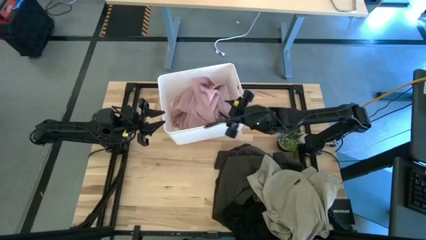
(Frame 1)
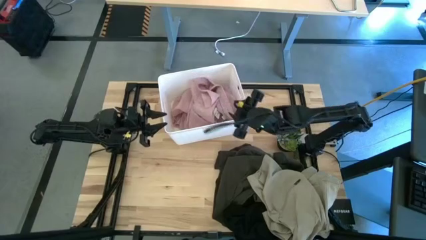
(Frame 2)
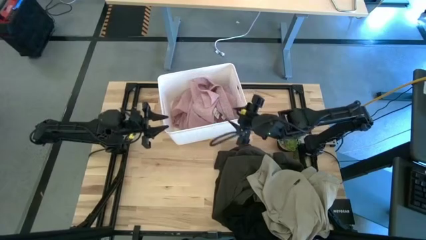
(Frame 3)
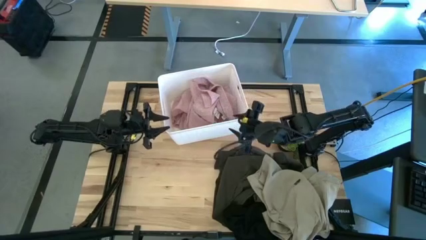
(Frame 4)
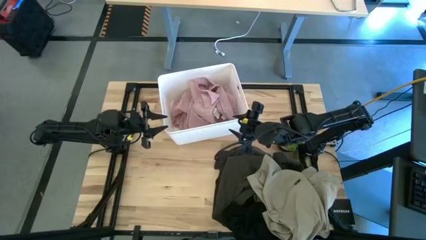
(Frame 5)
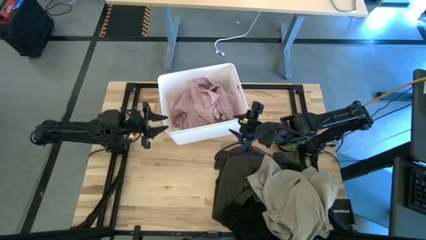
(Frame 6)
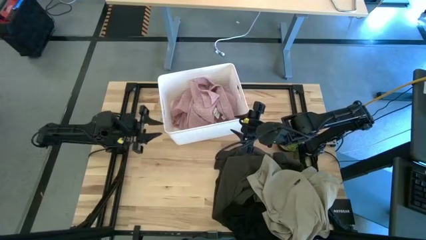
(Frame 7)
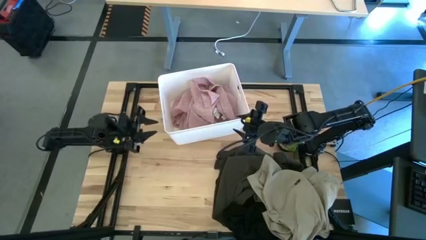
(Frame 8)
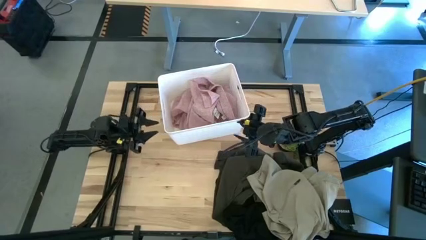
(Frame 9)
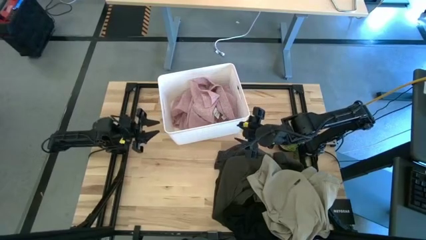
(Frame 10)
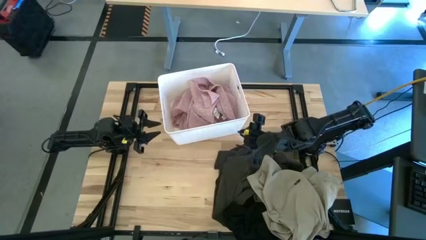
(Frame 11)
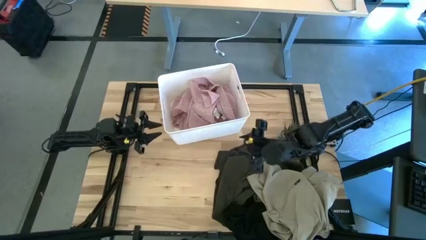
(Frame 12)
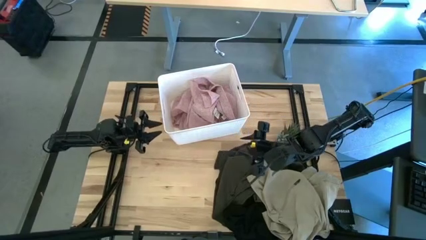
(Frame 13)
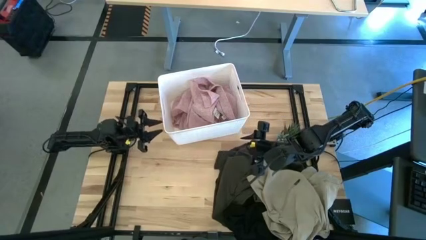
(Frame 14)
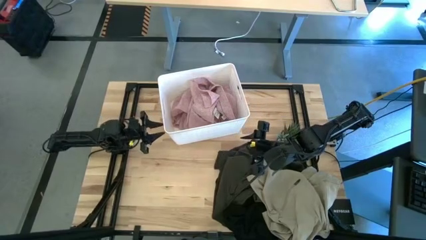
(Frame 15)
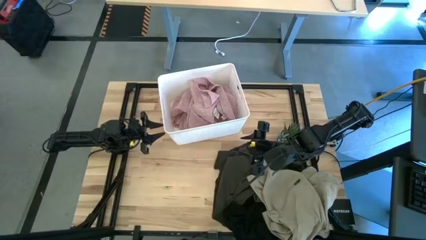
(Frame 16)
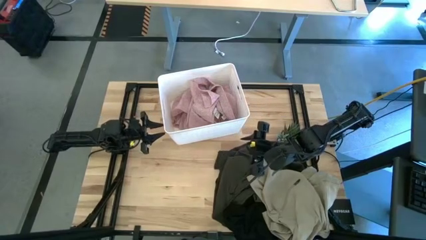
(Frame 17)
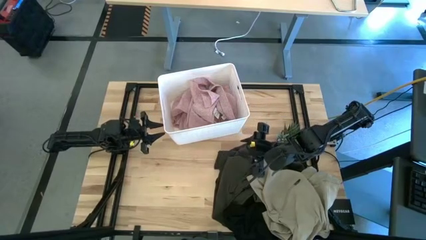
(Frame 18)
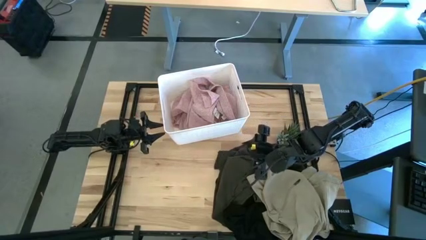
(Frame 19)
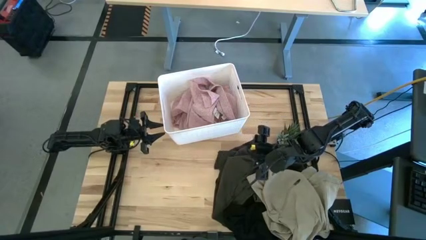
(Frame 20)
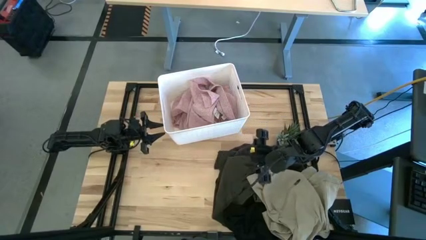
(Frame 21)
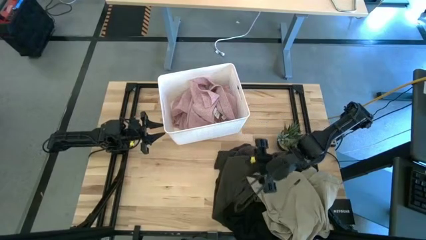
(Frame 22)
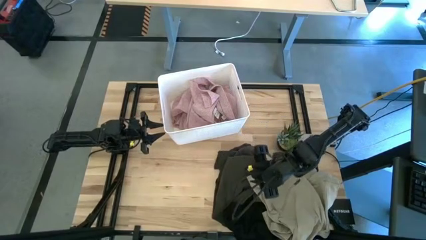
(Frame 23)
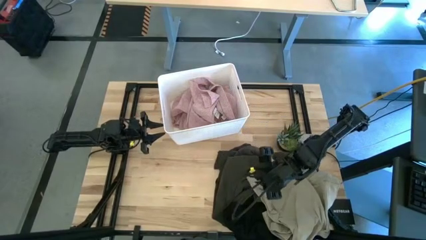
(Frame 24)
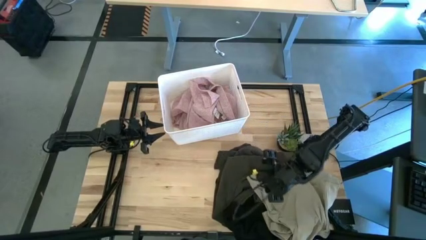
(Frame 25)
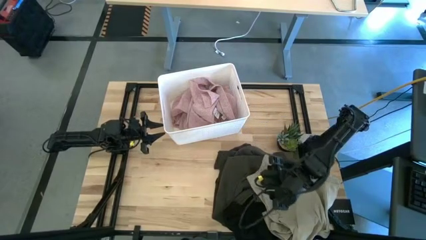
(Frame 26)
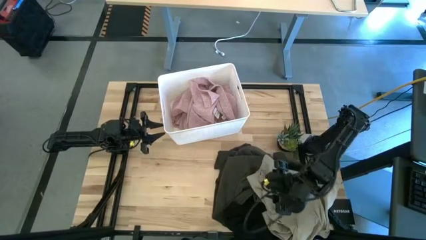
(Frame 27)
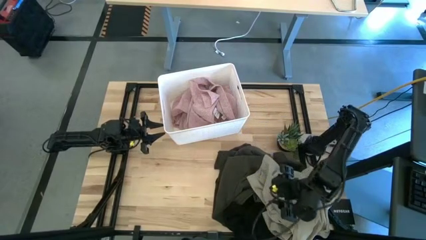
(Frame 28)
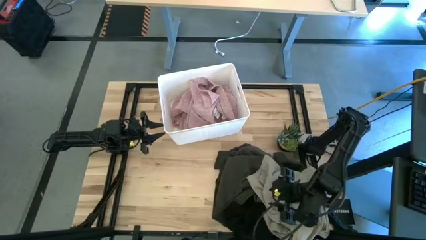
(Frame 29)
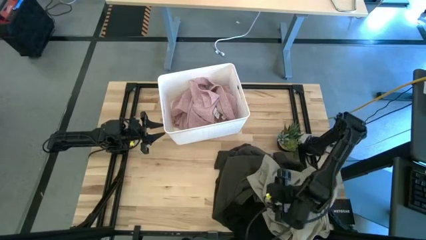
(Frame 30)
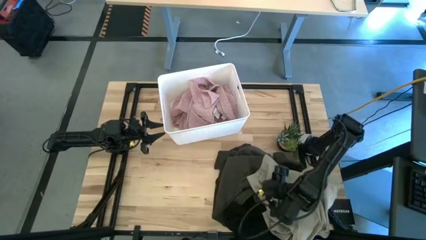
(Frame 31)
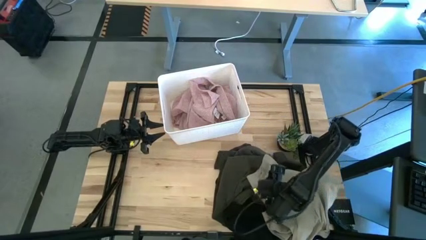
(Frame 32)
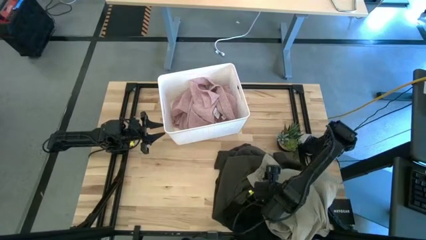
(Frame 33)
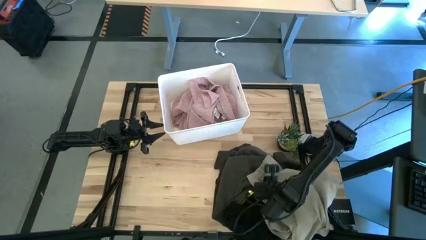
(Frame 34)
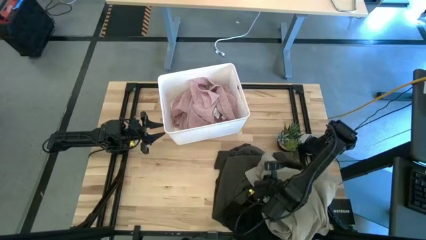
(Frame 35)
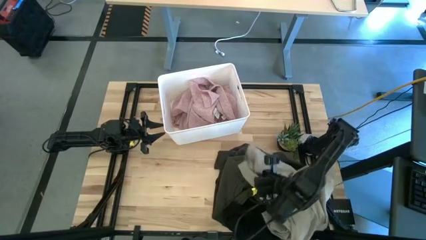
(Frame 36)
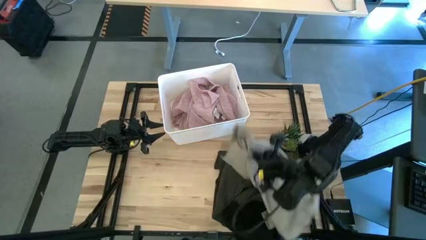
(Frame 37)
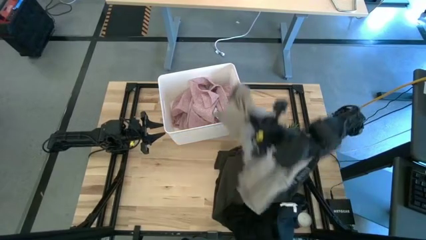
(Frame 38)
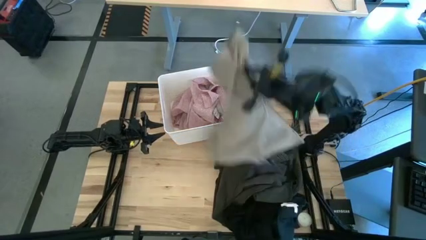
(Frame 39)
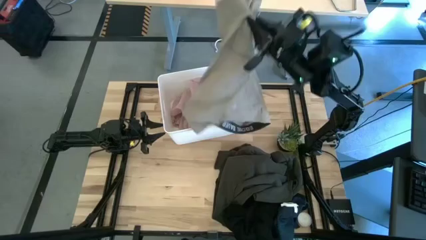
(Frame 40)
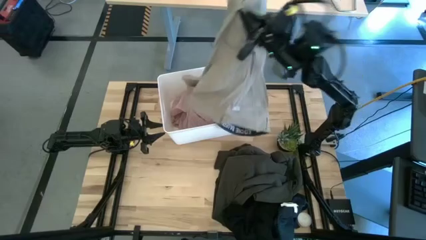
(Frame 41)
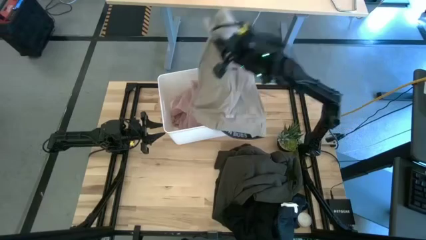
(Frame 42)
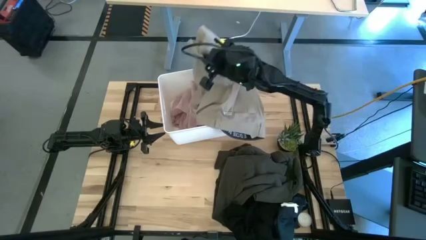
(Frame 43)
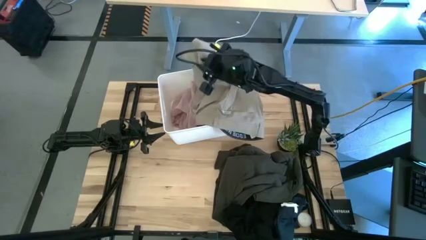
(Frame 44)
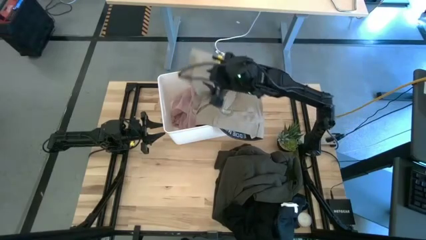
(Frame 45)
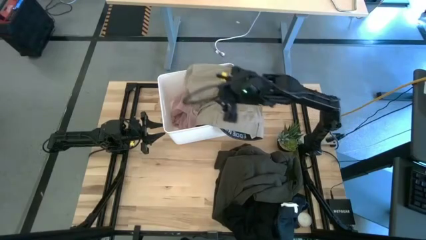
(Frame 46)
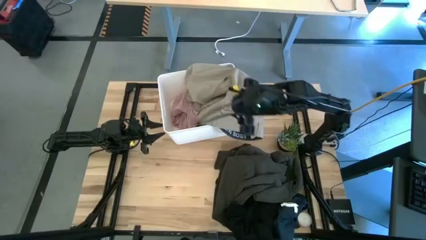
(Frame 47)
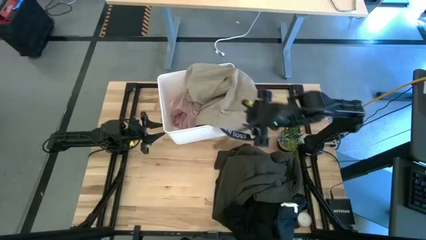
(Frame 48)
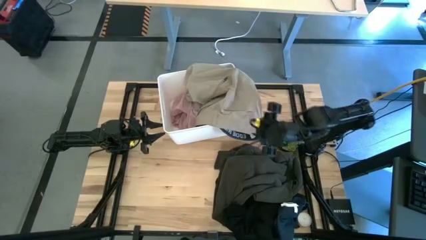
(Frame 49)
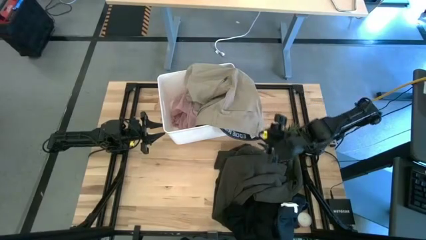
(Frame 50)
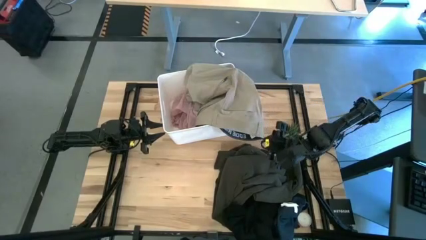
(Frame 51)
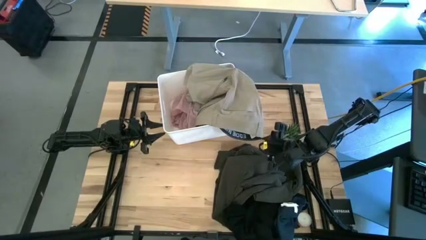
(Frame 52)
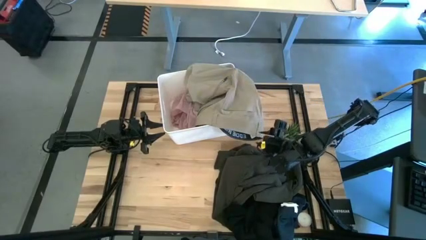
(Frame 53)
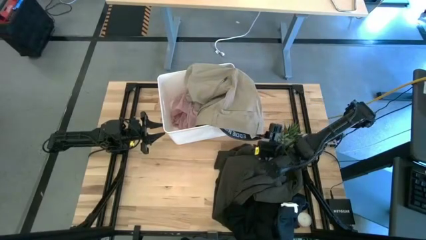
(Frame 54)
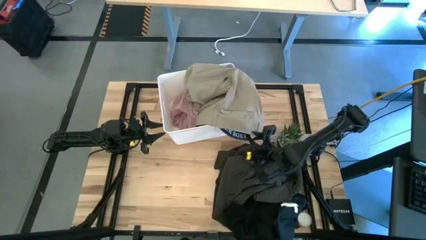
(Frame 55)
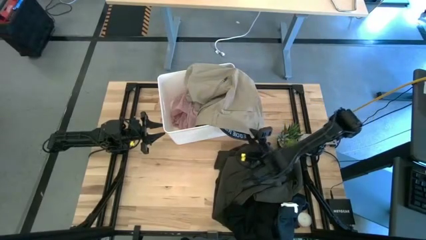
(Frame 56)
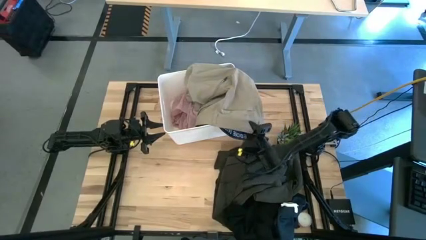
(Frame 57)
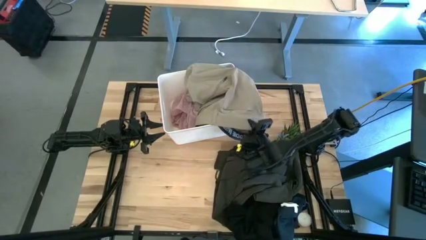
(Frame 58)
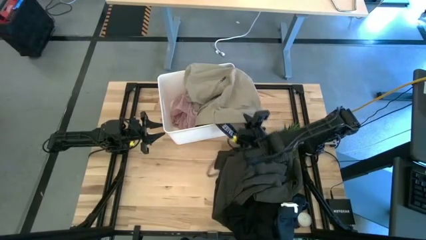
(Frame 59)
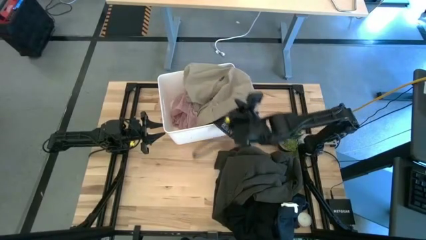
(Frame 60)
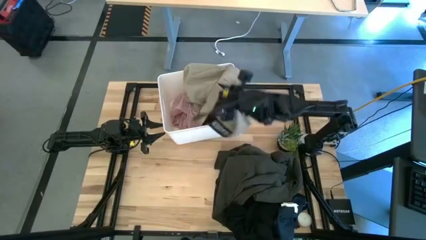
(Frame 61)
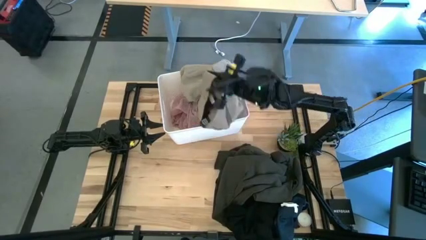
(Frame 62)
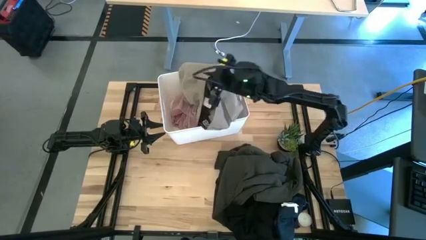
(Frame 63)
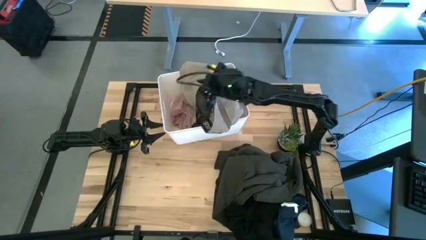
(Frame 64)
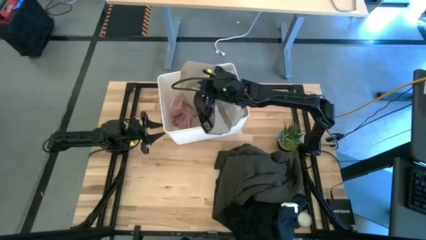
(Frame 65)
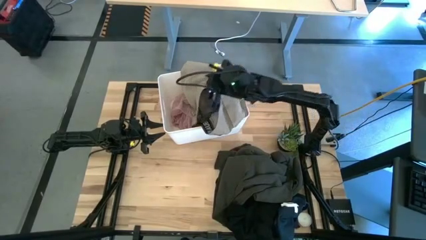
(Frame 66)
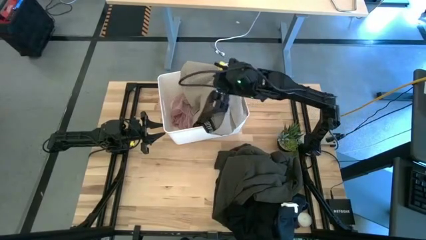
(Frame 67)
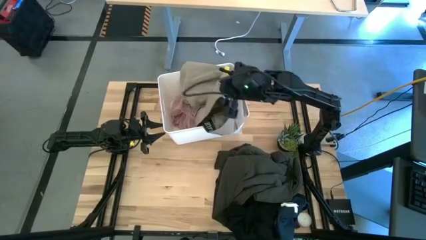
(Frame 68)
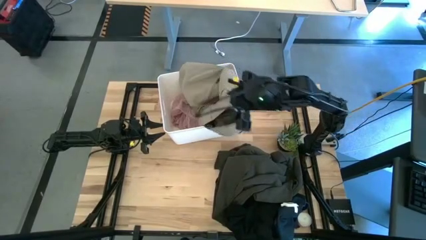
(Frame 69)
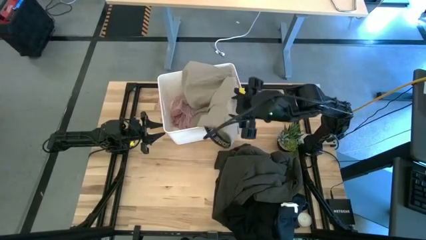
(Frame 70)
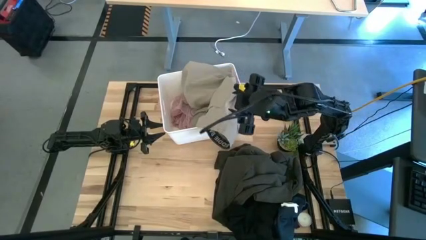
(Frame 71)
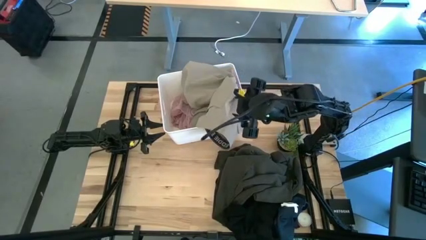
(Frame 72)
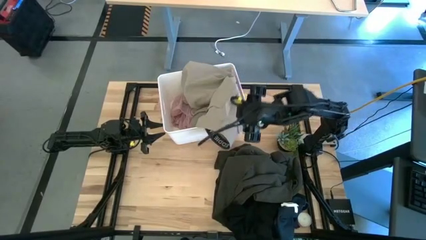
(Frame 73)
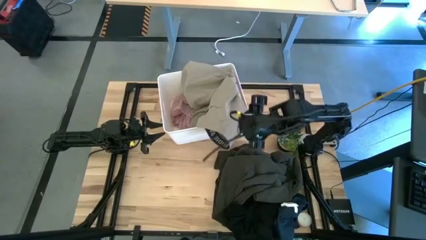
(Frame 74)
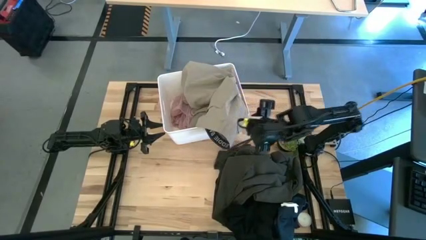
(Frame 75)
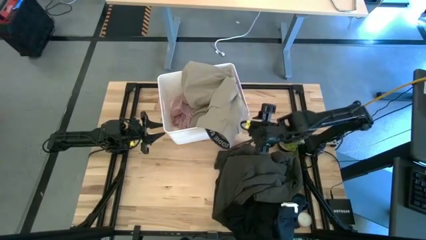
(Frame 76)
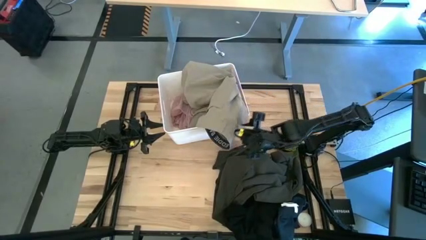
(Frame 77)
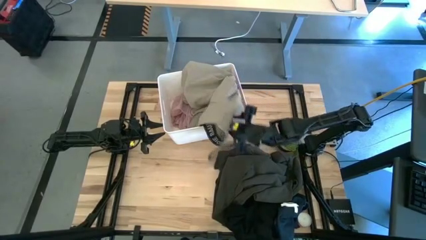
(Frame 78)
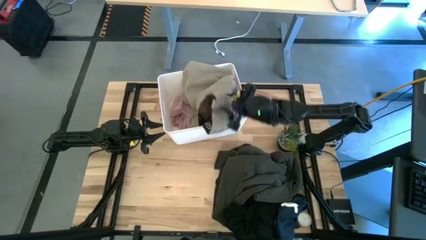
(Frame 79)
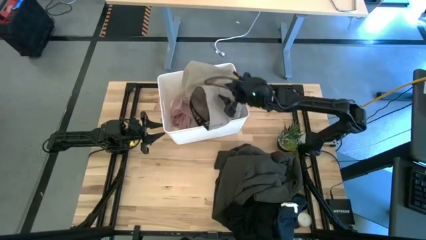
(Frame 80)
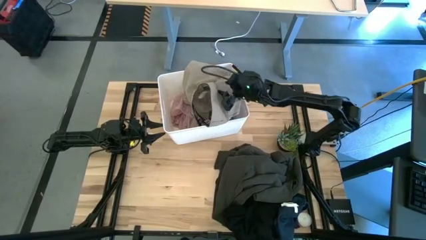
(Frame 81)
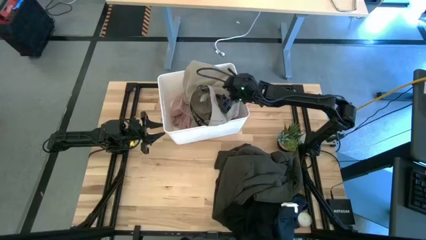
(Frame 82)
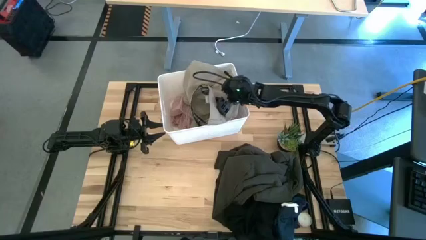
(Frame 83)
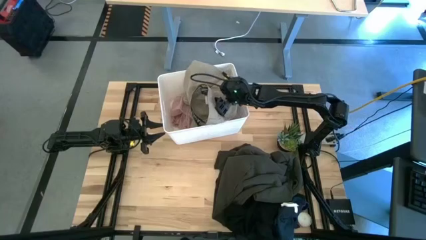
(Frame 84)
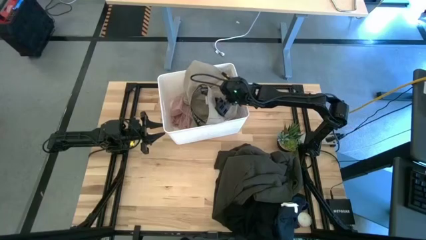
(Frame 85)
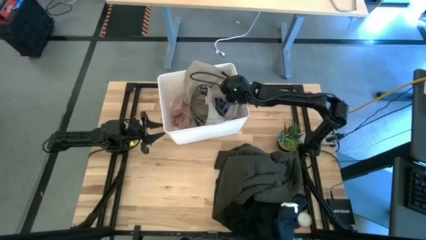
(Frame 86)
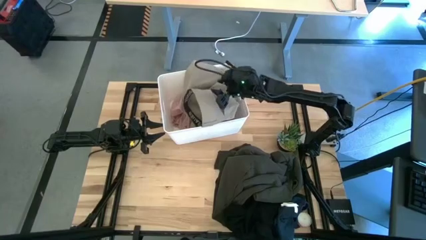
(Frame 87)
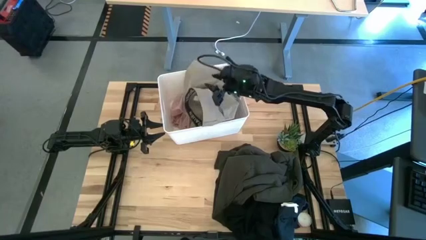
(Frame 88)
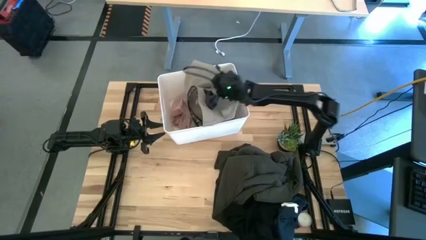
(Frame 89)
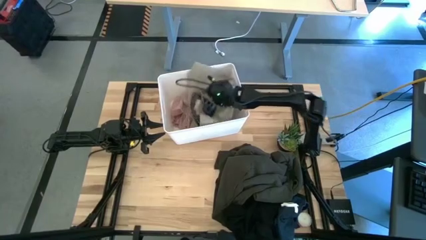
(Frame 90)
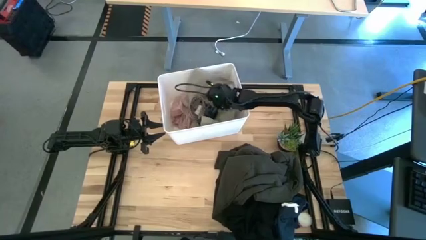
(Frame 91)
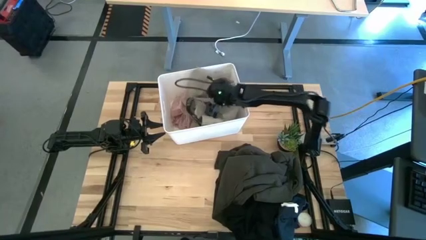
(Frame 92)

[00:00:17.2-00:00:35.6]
Task: Sort clothes
Put the gray shorts into the white laundry bin
